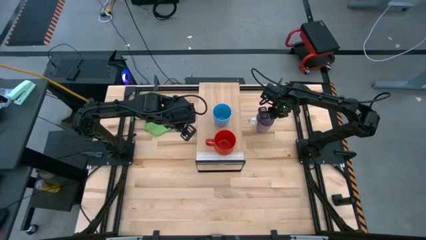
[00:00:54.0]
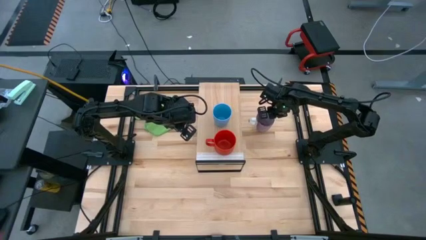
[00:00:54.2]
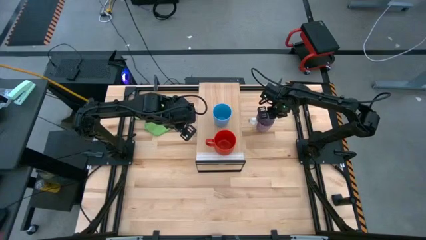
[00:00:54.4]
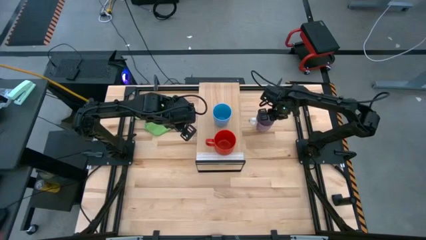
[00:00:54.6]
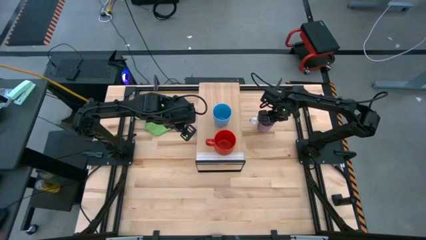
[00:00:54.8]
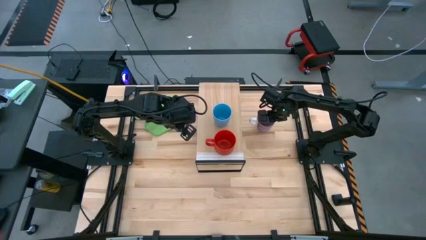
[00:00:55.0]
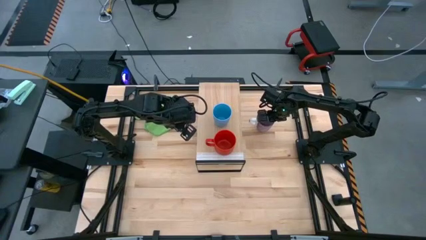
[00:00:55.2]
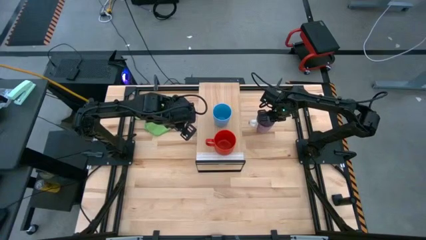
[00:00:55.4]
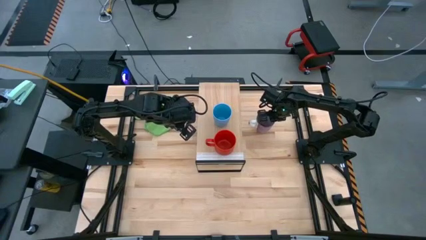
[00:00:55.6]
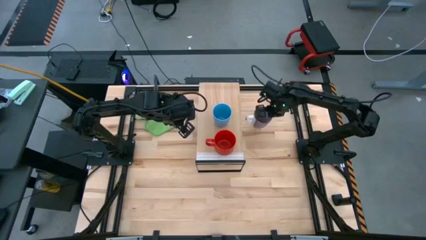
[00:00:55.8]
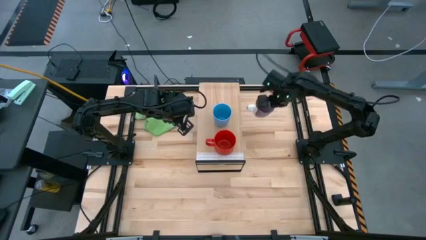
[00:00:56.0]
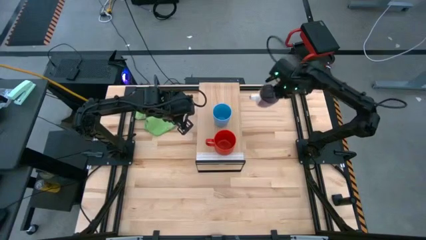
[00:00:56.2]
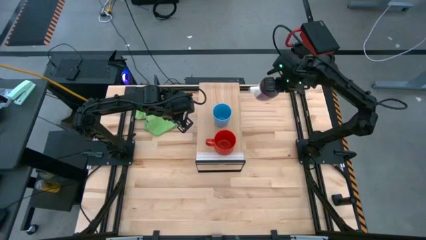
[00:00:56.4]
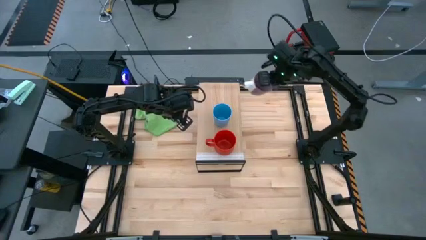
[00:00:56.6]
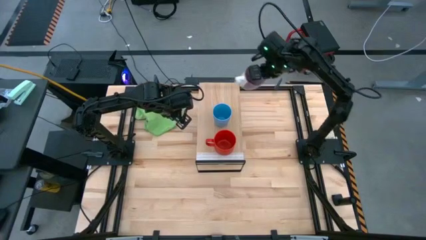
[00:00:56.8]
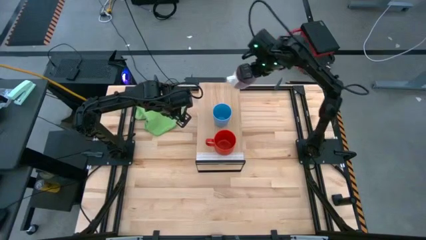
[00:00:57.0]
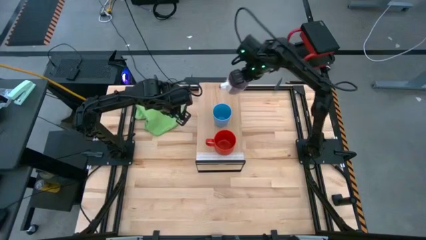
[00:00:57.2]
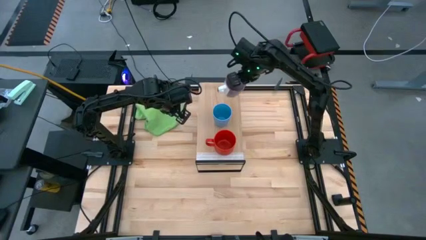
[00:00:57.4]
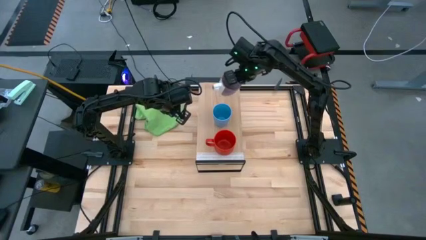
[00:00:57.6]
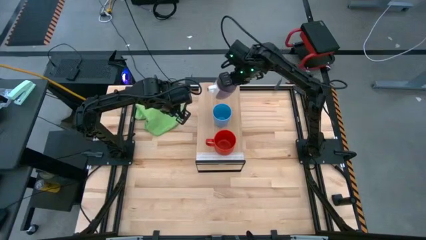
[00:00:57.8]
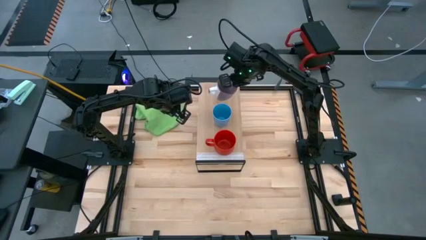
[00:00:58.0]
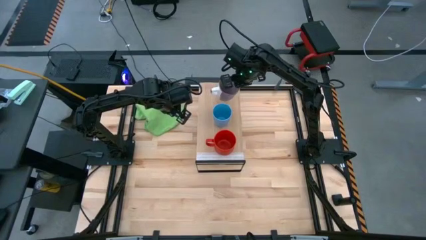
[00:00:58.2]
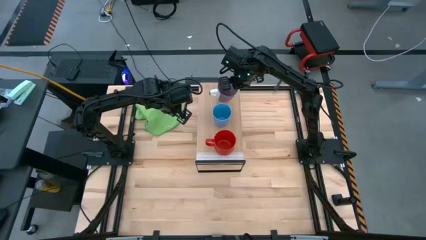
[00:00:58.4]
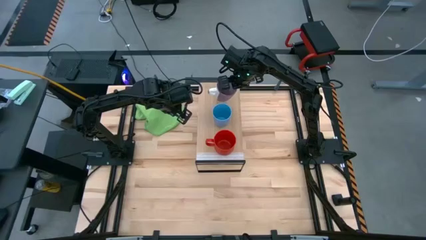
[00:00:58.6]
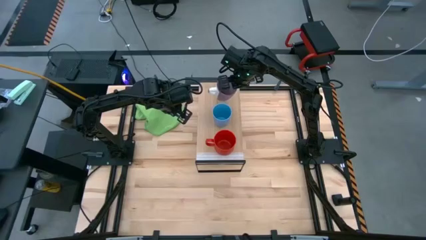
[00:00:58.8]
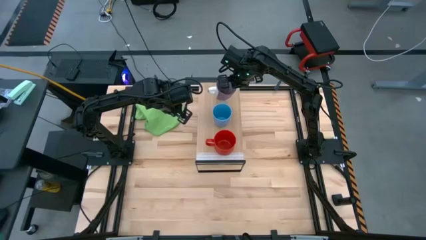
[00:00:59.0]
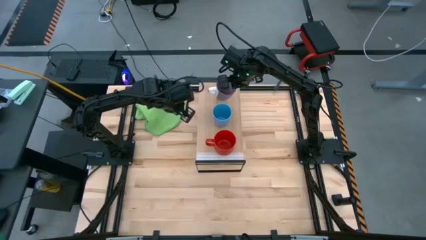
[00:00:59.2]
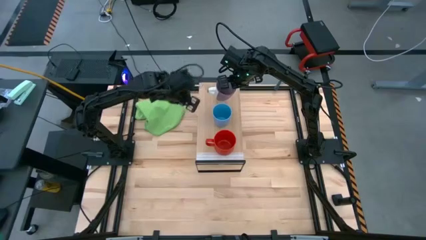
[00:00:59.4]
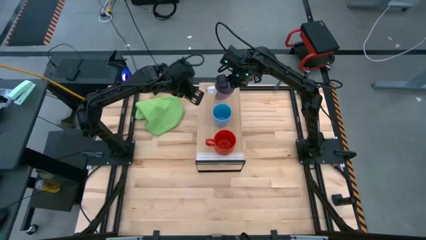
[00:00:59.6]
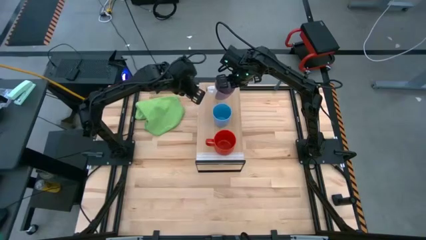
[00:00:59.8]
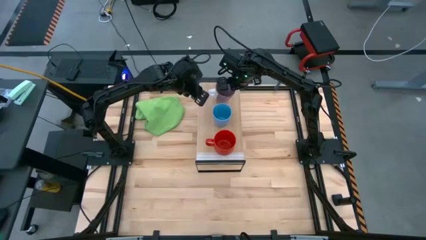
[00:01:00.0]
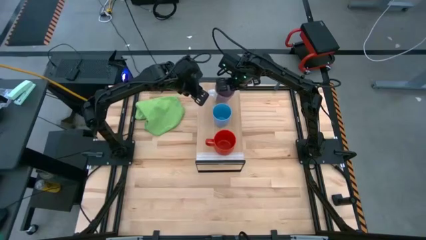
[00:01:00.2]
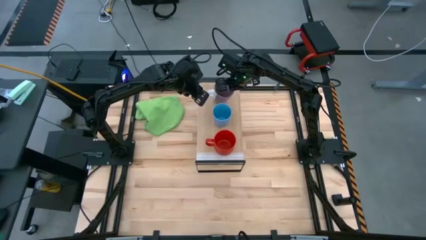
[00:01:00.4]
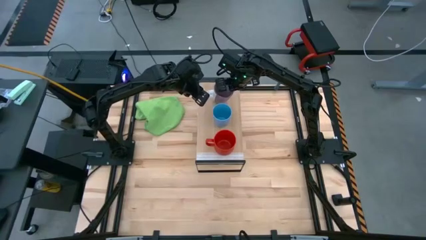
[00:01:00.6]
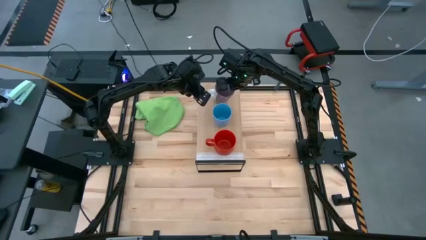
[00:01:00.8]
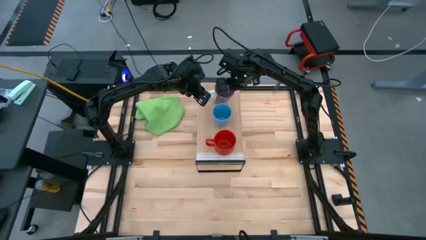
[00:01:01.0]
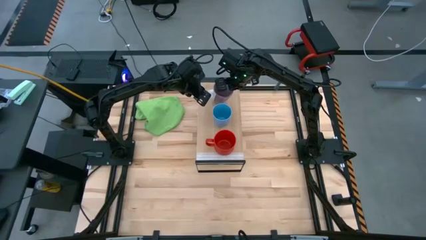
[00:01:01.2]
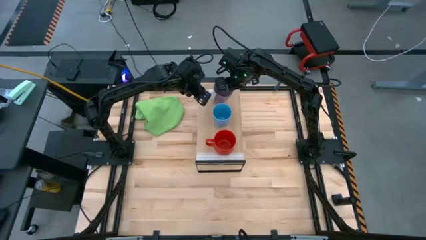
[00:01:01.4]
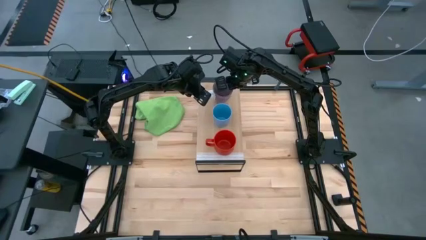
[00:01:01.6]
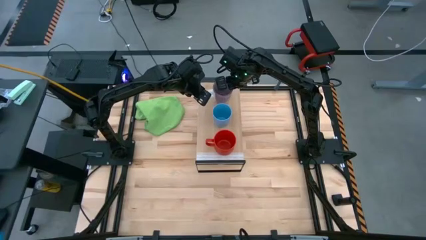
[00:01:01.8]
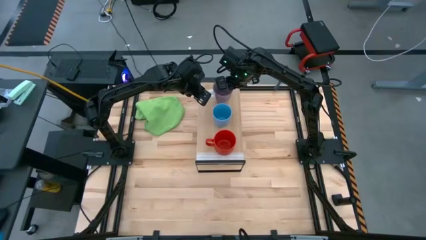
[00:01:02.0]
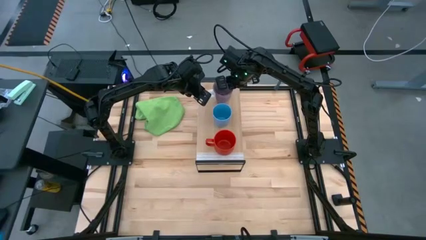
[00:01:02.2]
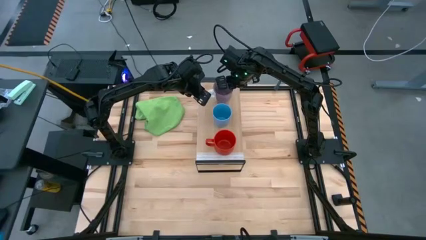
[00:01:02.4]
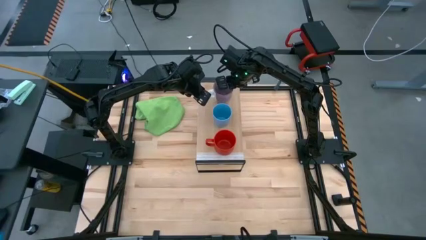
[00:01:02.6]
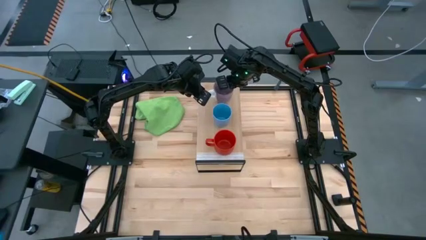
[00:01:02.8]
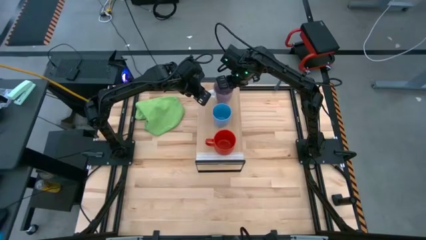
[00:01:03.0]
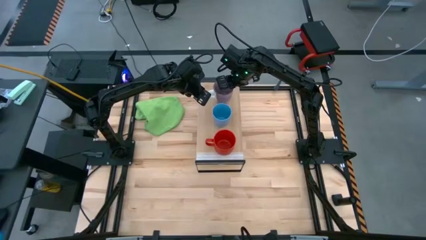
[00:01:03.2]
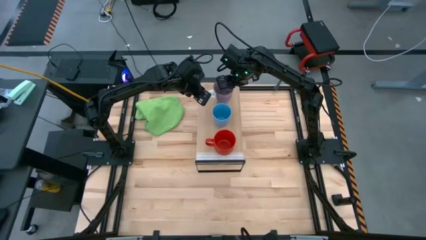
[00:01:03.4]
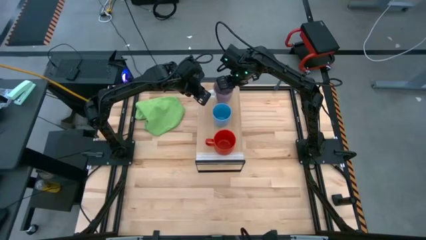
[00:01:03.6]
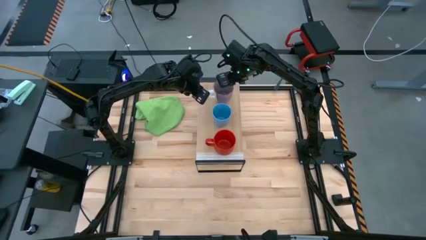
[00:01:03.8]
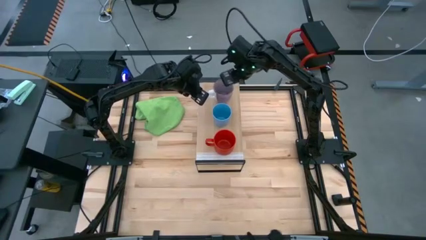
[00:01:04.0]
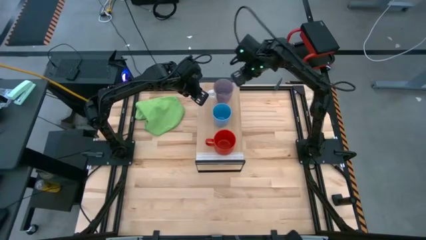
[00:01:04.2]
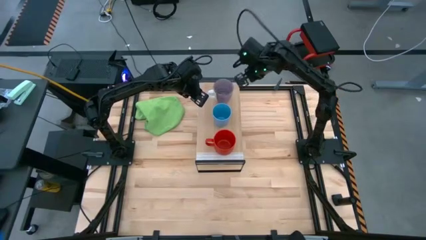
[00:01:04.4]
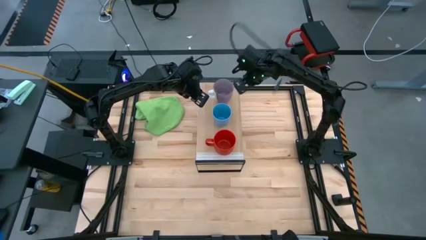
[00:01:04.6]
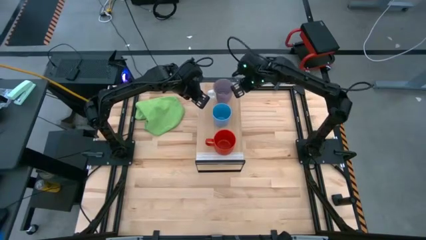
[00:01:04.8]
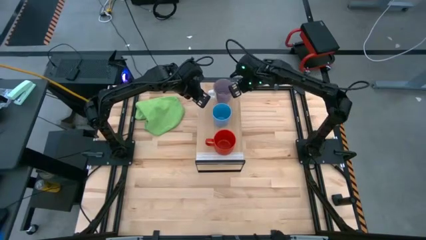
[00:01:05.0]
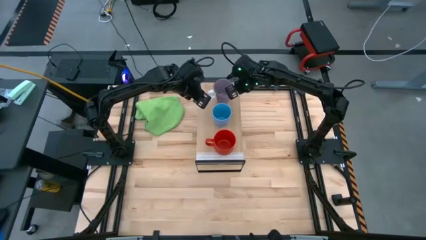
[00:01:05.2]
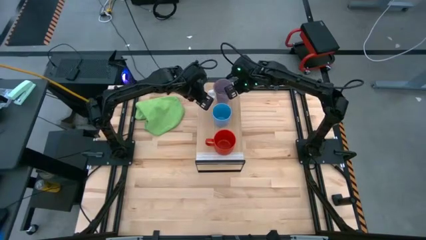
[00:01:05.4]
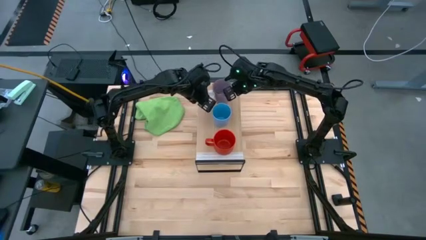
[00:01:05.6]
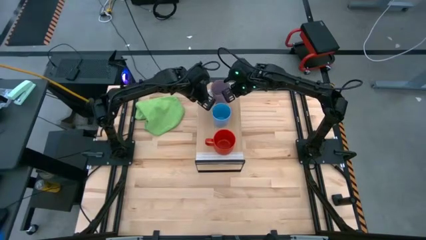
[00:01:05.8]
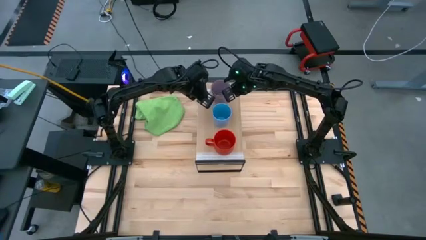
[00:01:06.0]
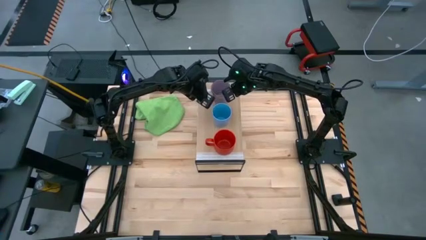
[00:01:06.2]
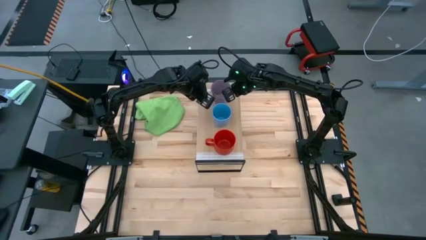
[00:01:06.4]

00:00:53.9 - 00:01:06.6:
Task: Stack small to large cups/mugs on shelf
Put the violet mug on the shelf

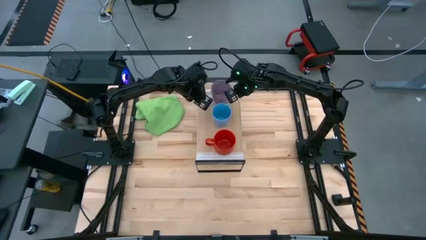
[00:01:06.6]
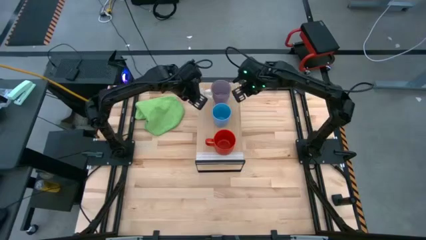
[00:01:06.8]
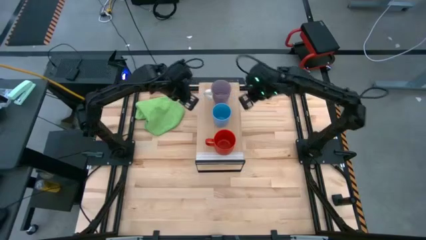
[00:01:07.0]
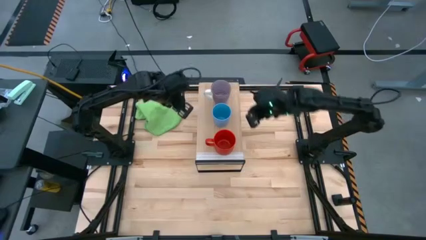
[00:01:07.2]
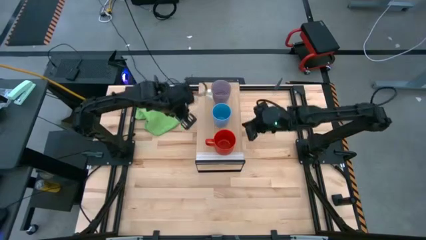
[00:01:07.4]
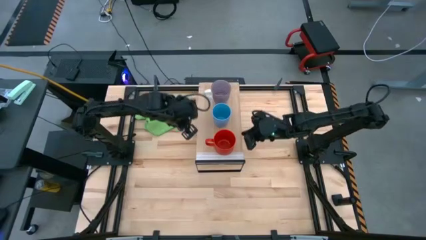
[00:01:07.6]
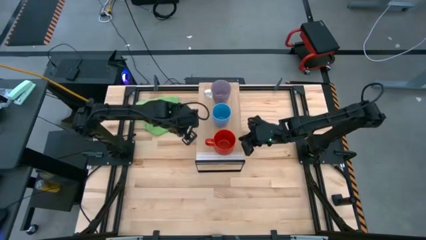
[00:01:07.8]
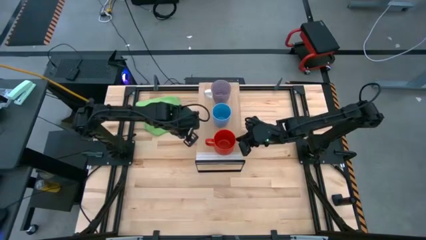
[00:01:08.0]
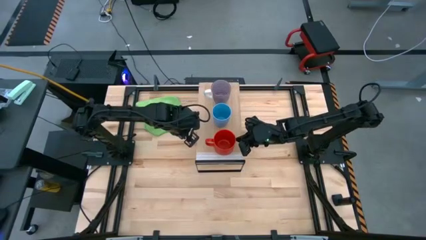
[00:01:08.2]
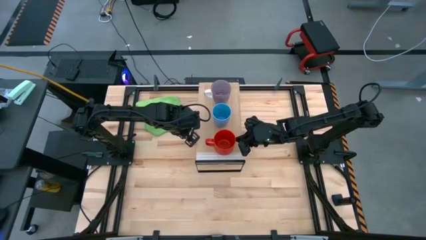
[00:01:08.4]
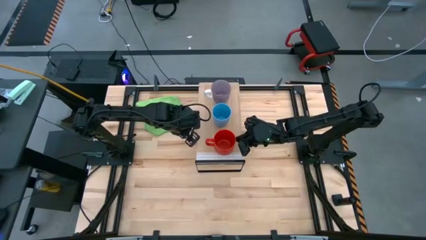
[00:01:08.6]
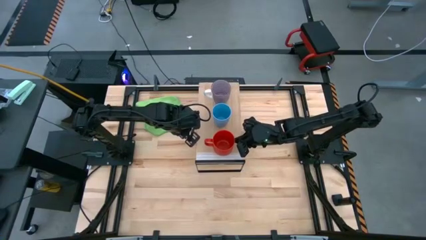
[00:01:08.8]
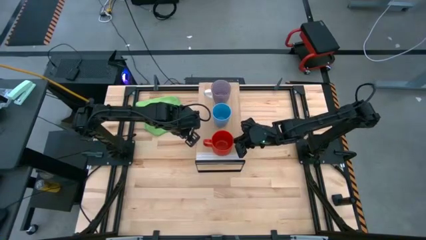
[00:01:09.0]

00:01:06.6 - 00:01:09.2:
Adjust the red mug on the shelf

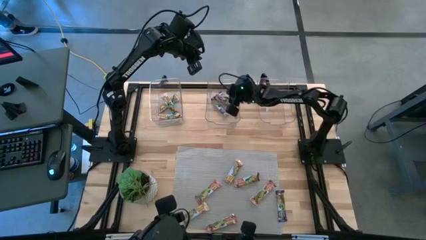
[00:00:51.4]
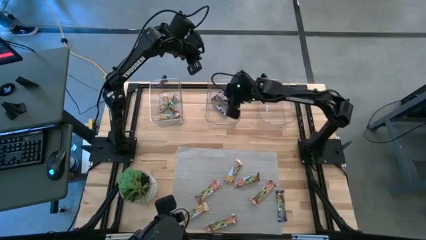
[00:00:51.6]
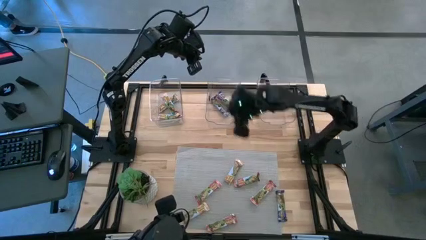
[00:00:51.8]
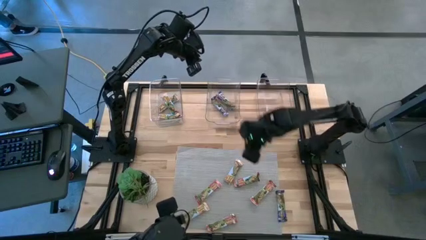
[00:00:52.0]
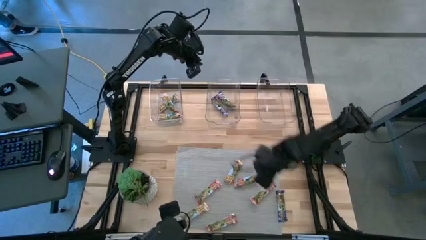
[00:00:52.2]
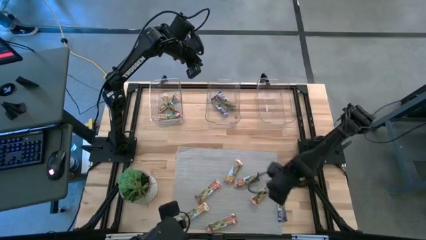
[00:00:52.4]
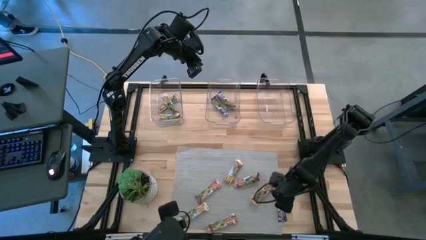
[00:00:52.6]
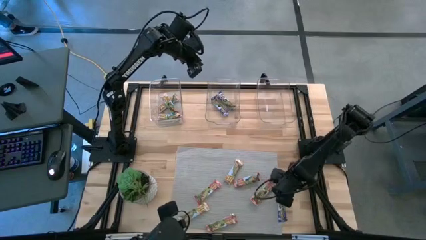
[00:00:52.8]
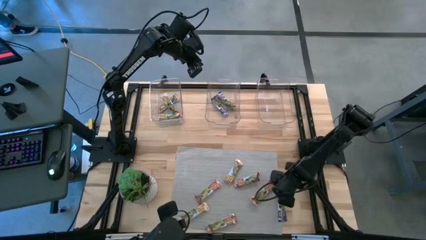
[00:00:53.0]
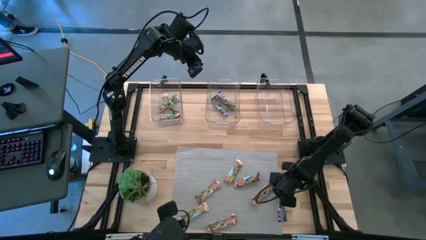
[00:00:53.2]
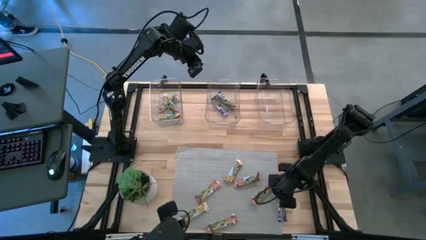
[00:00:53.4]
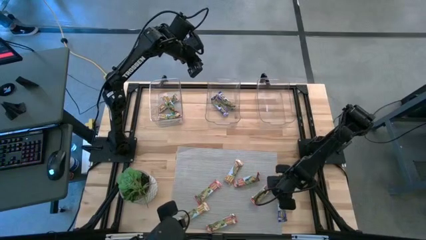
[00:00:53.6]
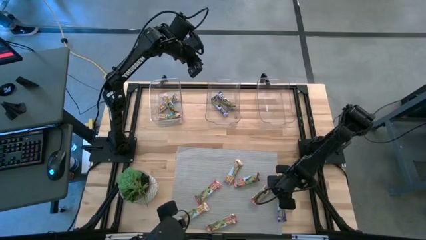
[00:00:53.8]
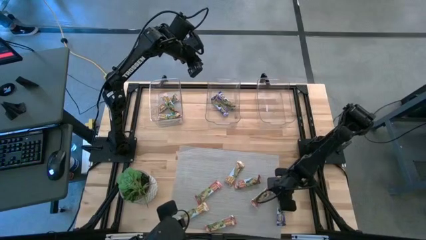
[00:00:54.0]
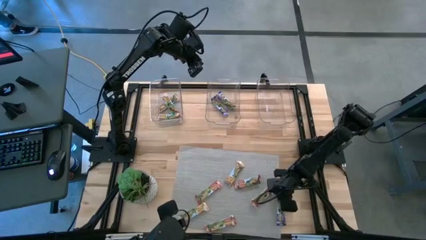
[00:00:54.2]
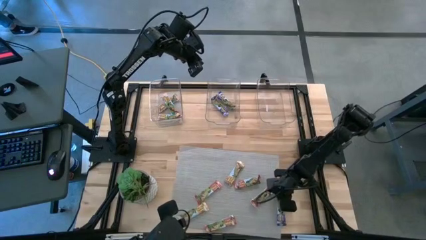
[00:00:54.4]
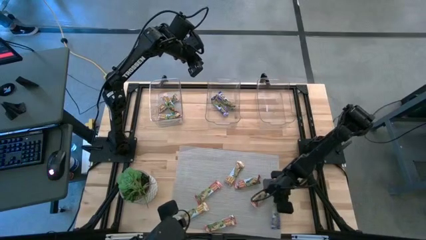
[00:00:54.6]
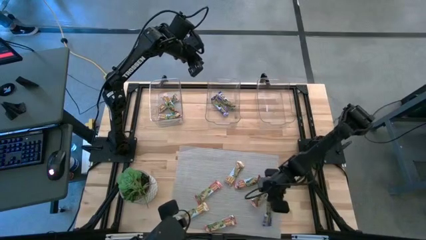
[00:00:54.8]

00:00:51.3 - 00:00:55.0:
Task: Pick and place Granola Bars by type
Put the blue granola bar into the middle transparent bin
